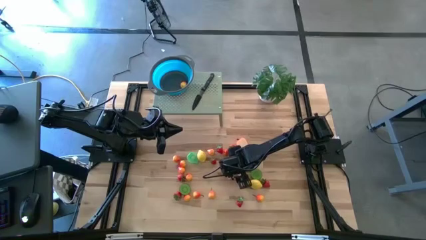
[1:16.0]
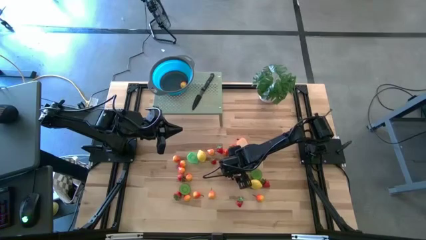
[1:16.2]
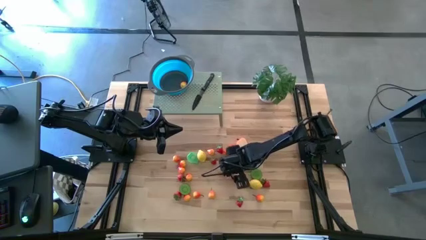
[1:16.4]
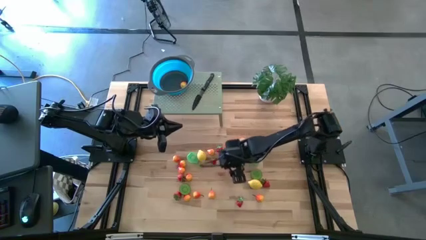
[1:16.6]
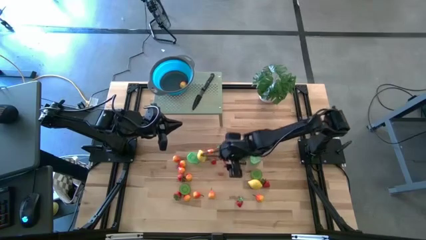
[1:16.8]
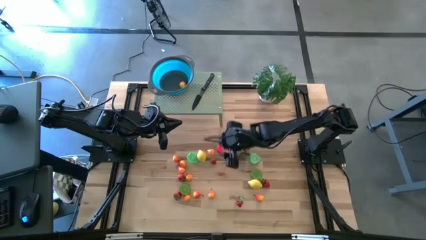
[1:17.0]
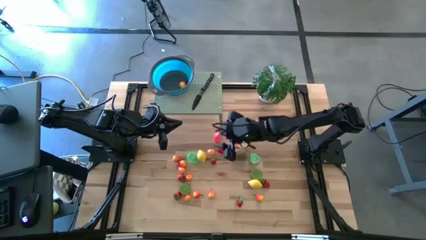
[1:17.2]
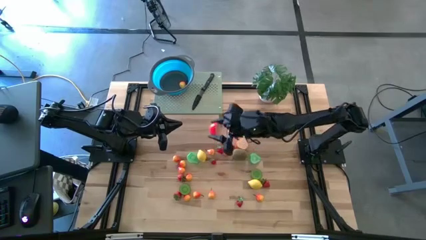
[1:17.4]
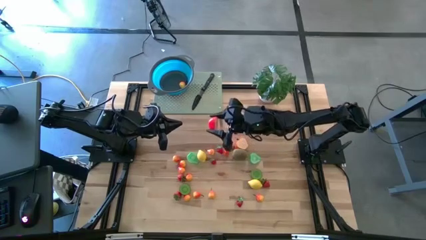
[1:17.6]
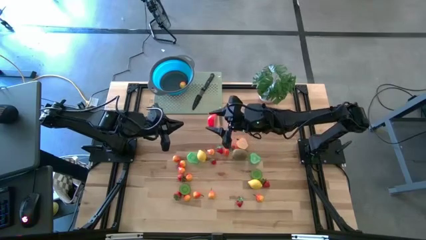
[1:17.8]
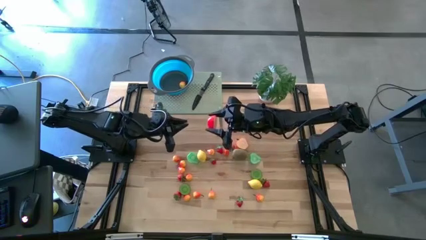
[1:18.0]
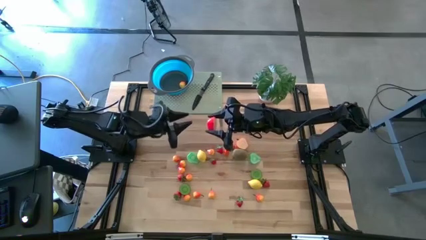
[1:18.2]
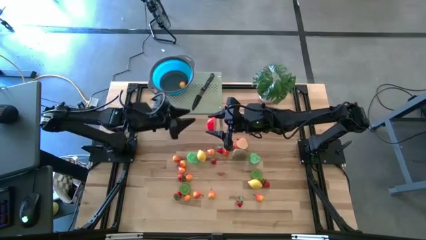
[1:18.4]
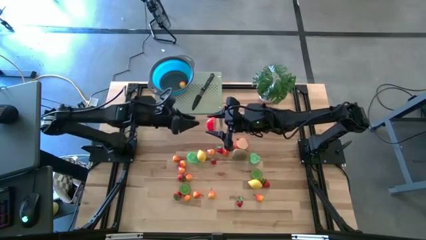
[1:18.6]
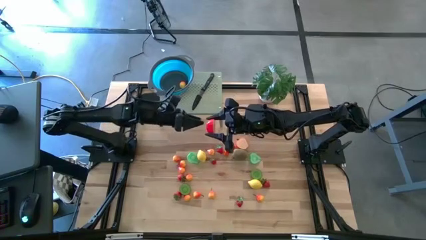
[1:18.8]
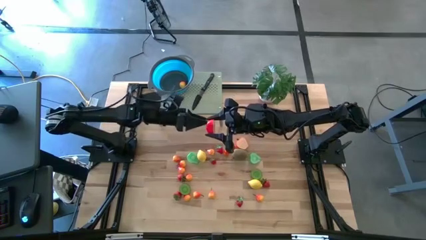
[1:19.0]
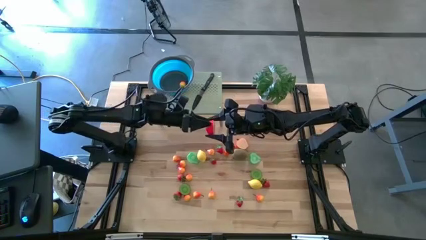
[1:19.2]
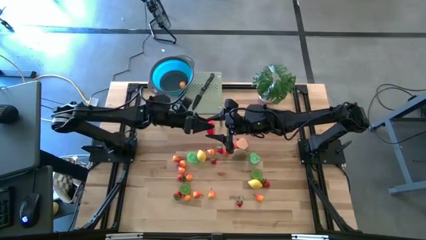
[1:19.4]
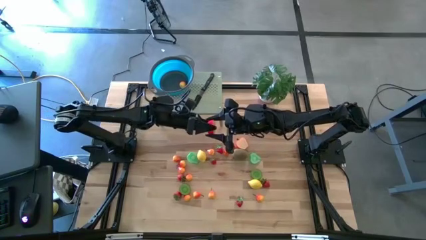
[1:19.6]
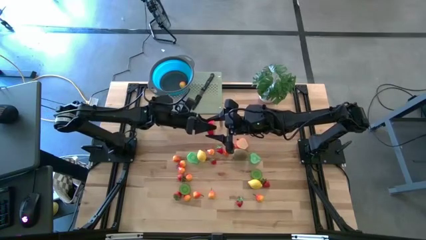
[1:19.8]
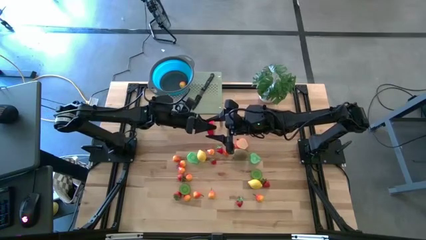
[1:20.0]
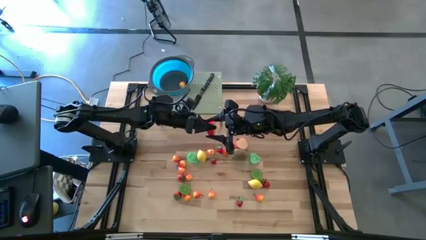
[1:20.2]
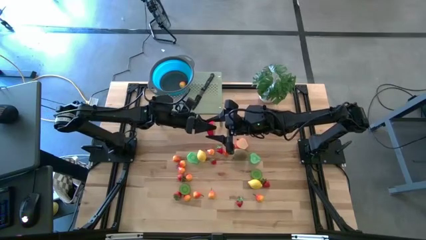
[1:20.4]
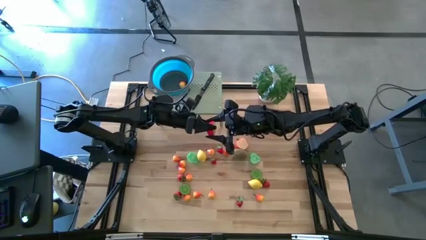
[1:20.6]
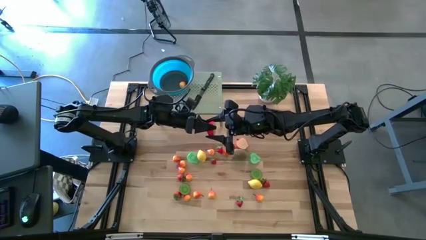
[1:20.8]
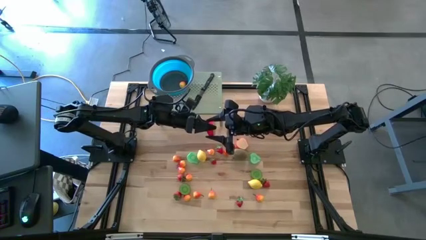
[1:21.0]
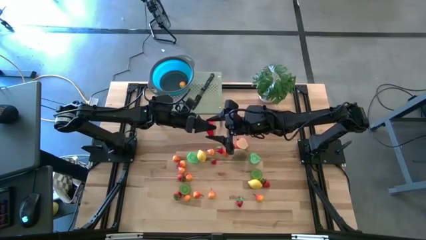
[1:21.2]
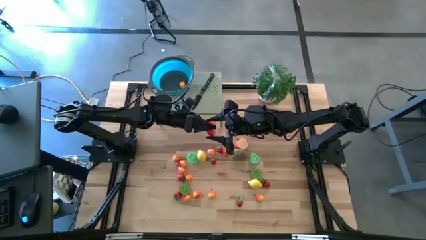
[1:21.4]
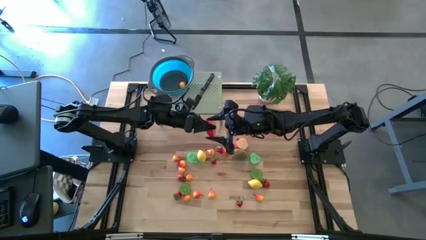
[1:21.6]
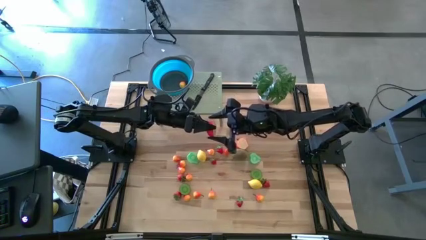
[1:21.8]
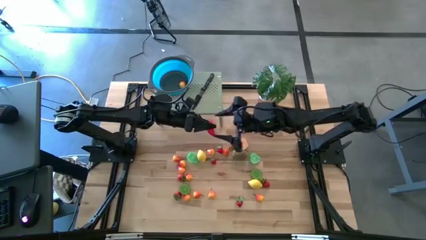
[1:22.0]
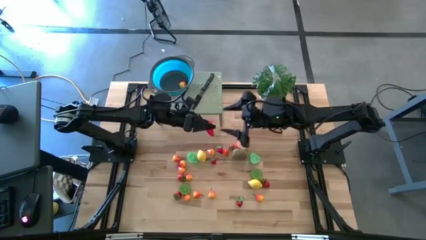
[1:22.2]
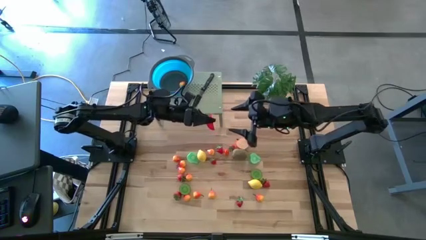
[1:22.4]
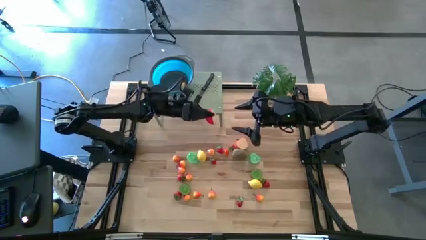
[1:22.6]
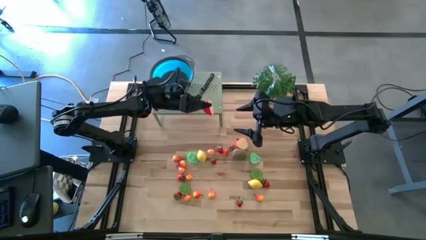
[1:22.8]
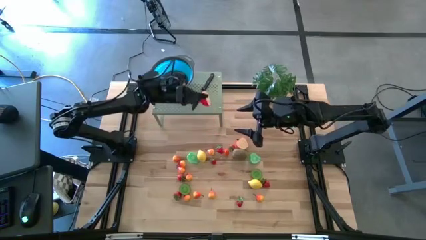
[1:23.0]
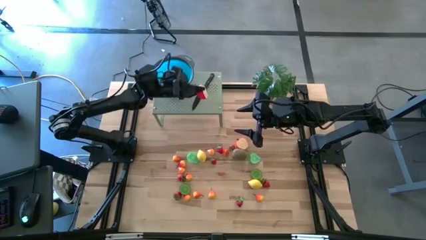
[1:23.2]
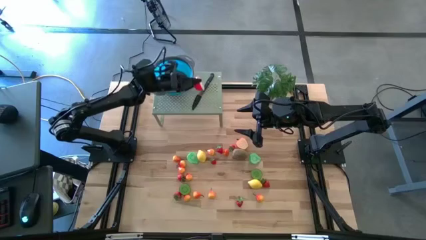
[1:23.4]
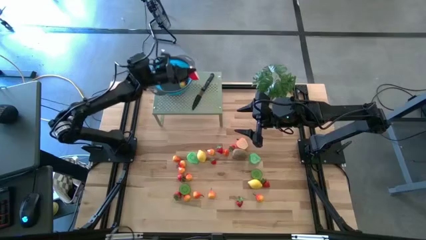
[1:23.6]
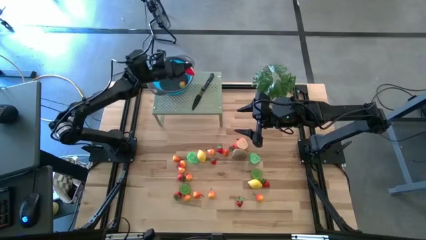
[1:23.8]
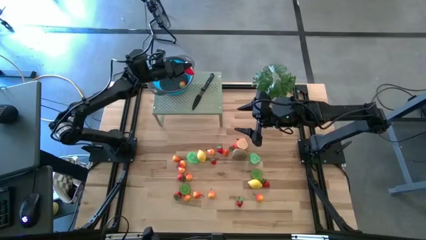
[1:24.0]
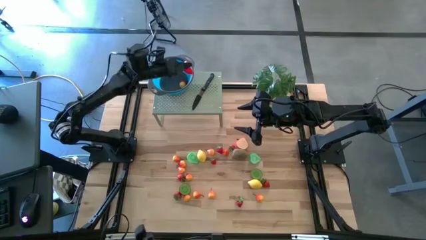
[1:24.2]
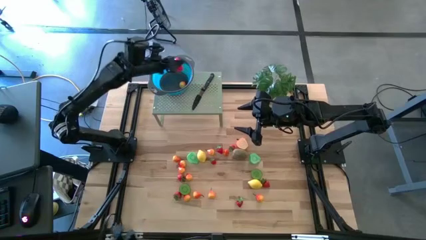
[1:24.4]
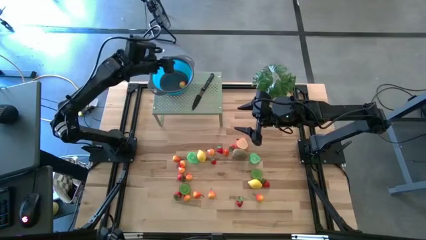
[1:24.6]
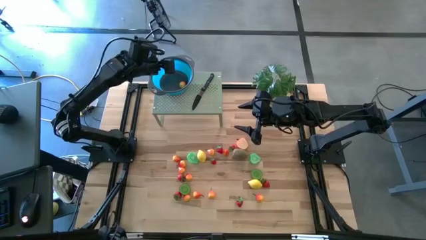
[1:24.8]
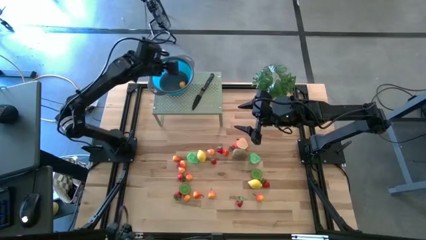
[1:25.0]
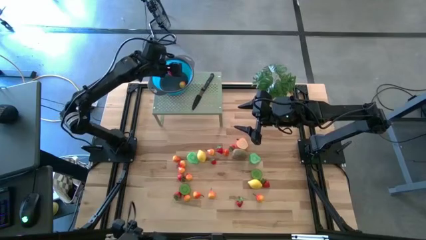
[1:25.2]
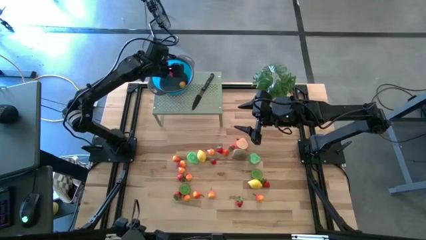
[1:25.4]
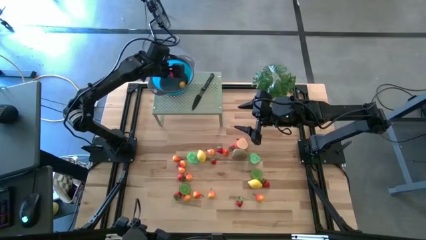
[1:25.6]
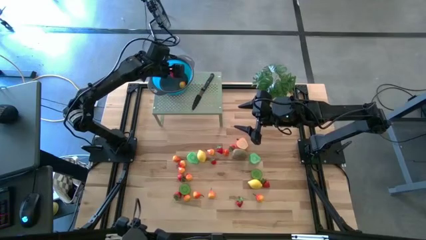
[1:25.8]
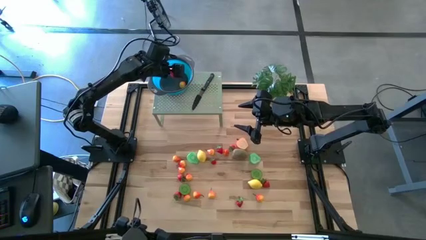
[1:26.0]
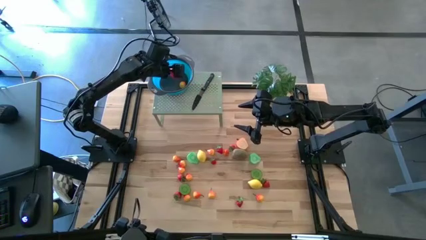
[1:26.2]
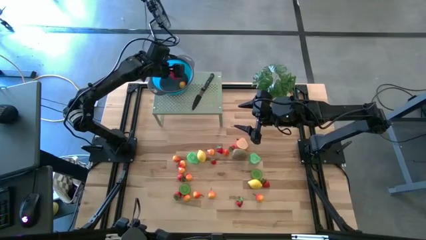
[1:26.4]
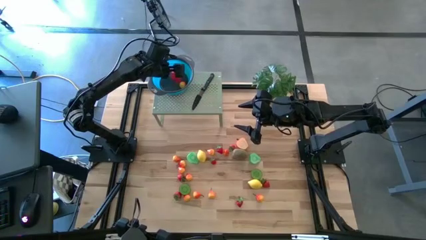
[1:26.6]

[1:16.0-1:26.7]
Task: Pick & Place Fruit
Put the half apple into the strainer bowl on the shelf

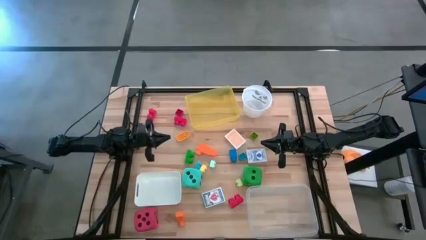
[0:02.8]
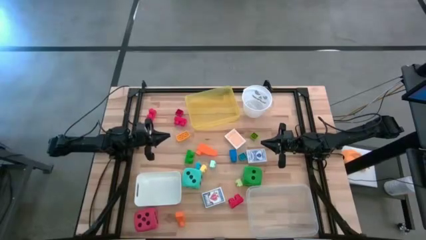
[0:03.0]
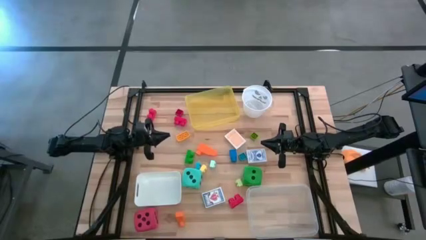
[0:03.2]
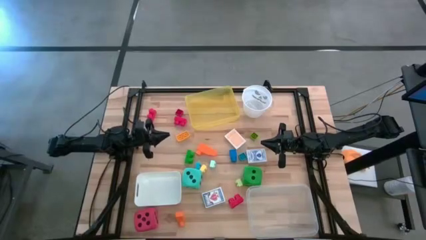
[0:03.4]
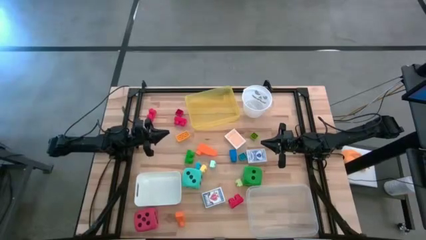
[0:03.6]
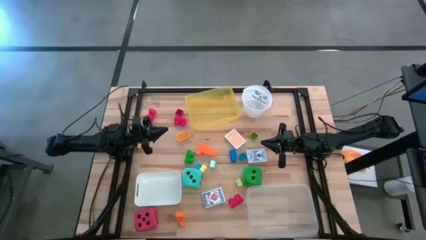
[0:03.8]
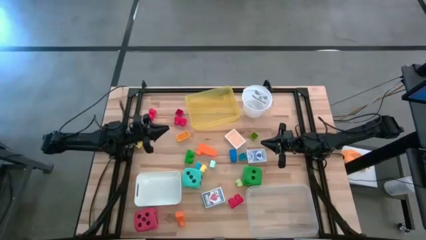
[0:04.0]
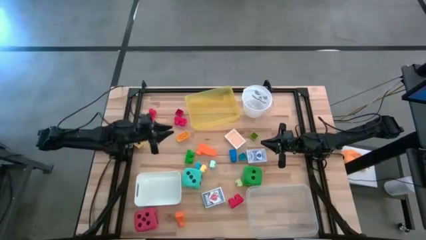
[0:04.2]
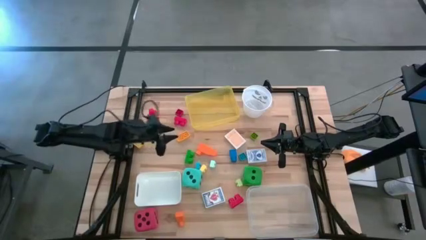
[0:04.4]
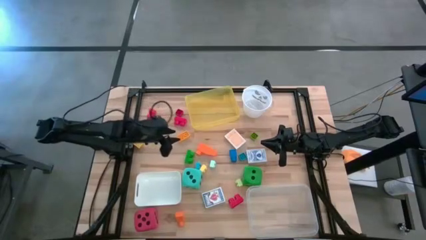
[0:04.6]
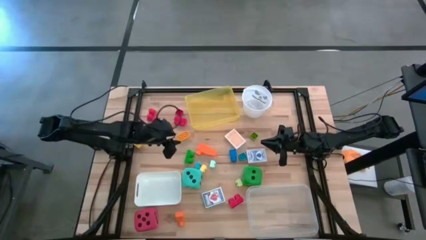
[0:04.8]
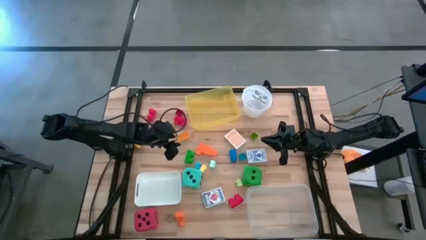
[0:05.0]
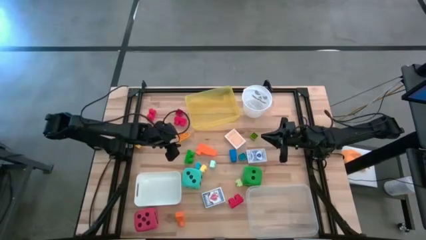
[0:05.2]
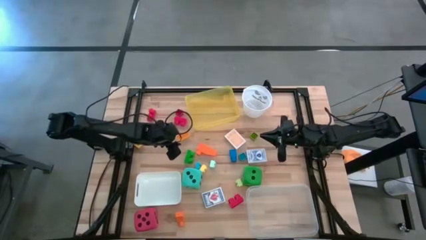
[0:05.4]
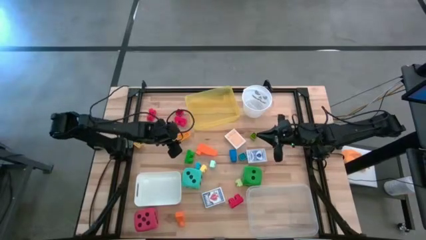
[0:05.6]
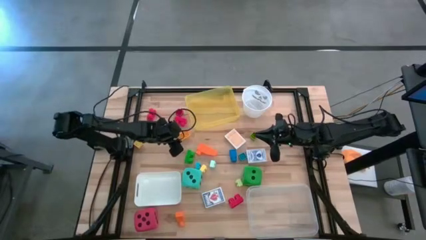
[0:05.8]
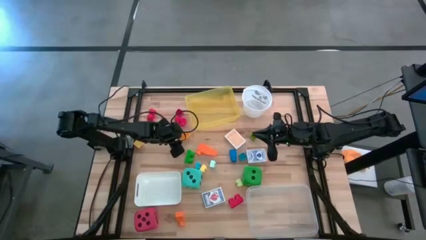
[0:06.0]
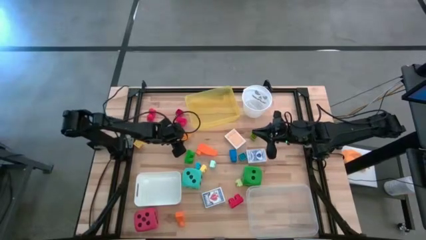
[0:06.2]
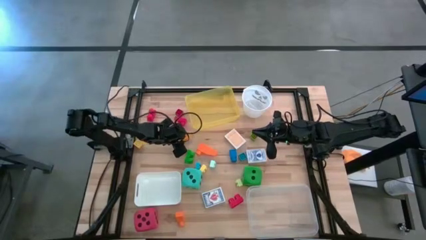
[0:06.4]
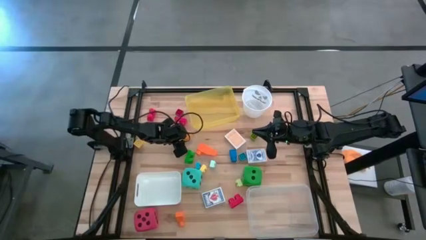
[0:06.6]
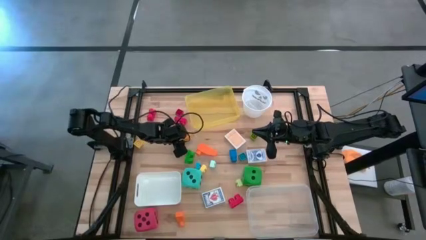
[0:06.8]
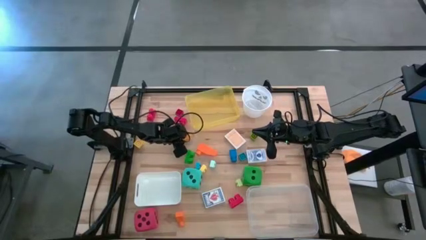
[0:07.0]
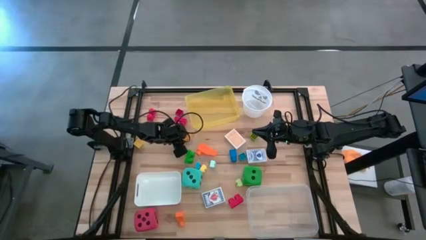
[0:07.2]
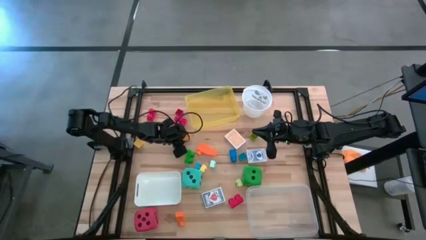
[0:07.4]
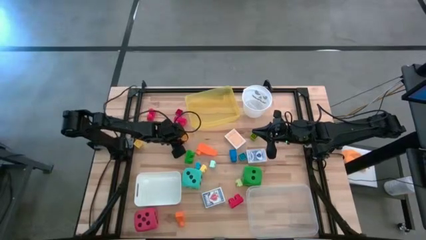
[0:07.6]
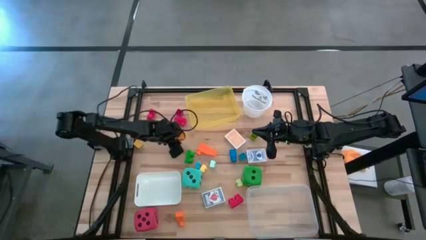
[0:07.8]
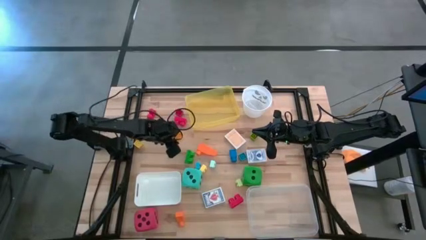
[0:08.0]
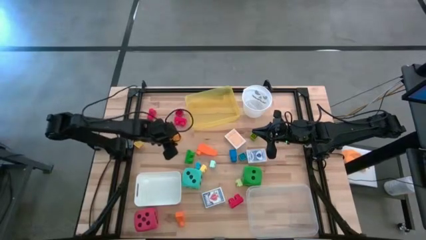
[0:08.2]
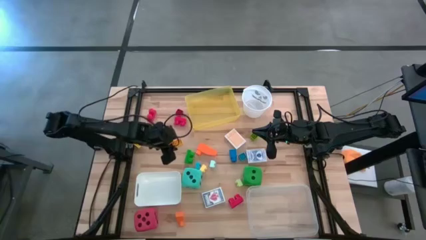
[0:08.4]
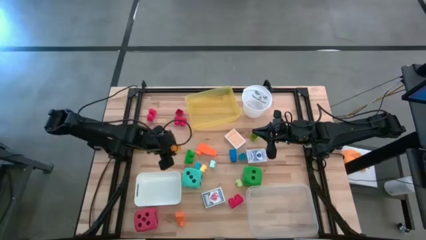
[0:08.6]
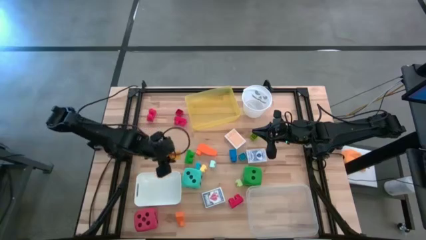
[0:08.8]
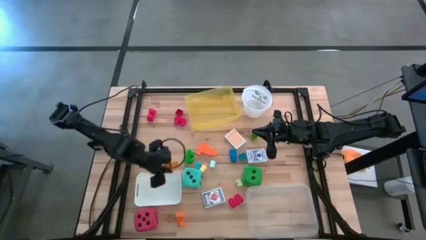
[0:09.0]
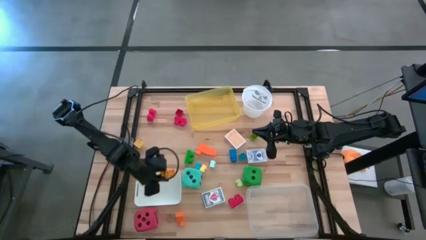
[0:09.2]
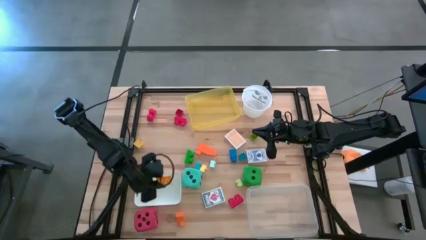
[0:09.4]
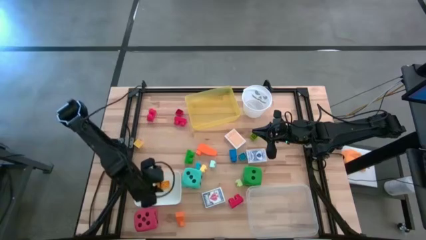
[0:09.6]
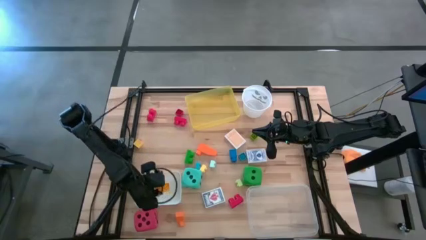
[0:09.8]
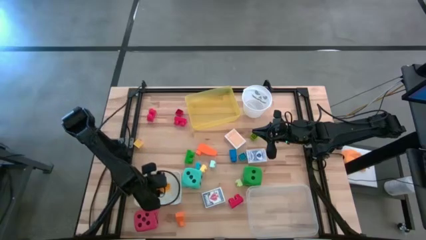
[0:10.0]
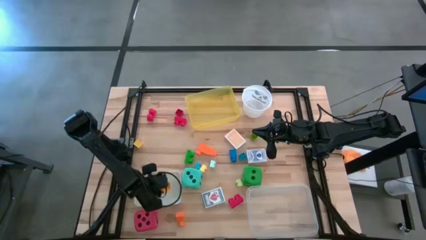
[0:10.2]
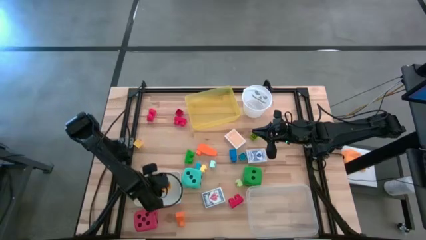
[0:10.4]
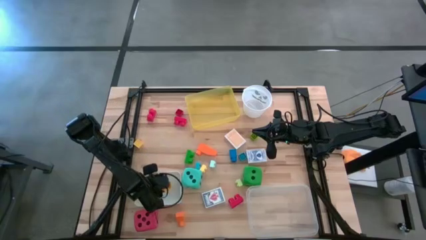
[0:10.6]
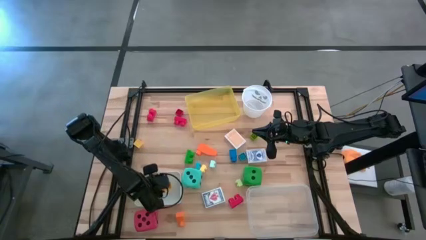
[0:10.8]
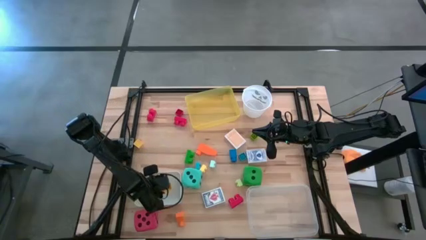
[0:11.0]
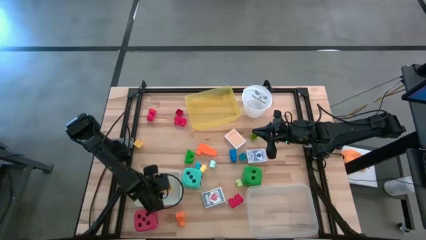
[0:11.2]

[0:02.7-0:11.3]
Task: Pick & Place Toys
Put the yellow game piece into the white bin
